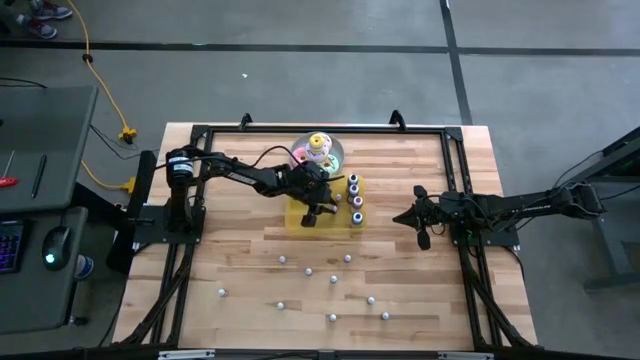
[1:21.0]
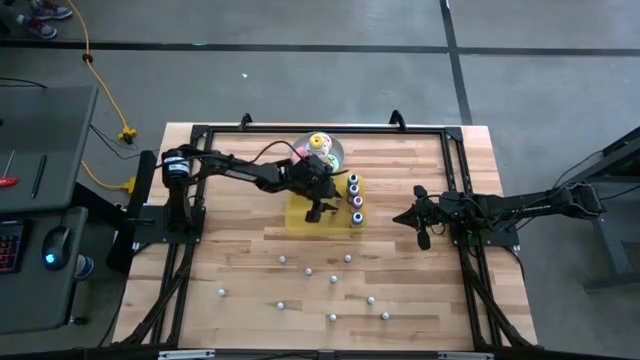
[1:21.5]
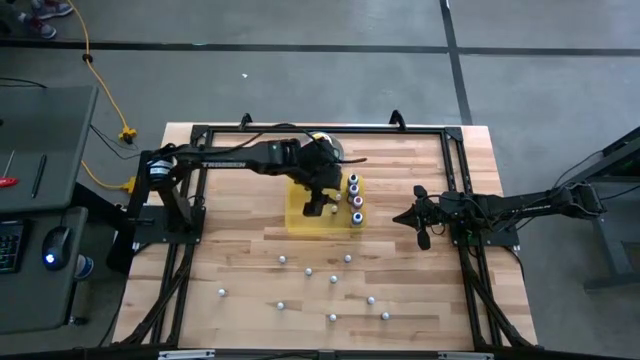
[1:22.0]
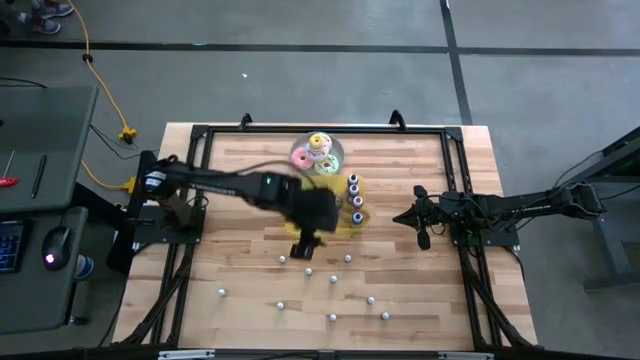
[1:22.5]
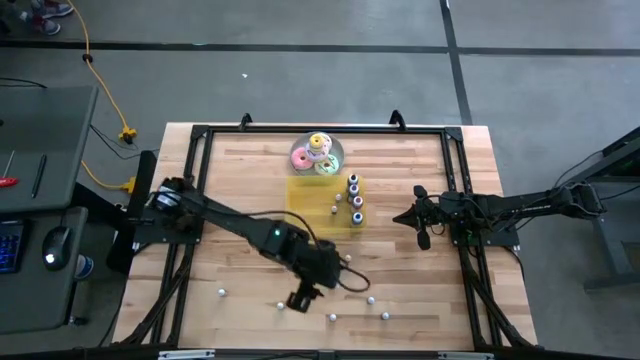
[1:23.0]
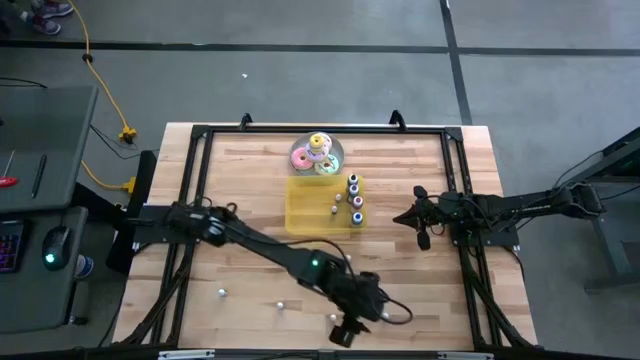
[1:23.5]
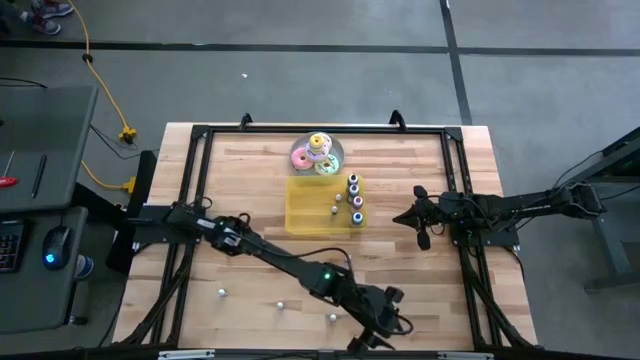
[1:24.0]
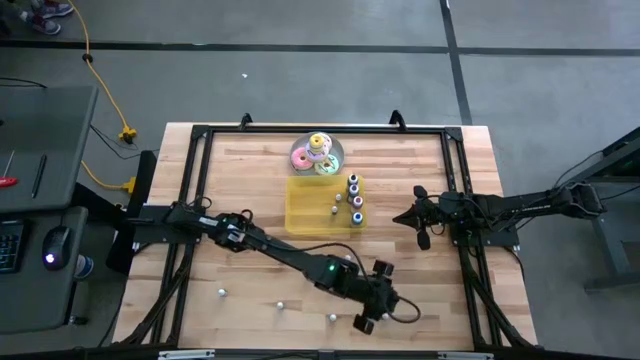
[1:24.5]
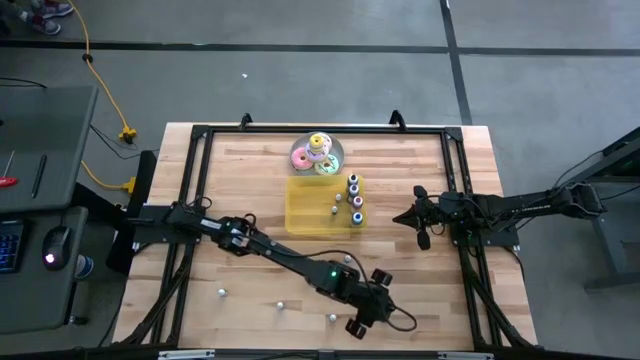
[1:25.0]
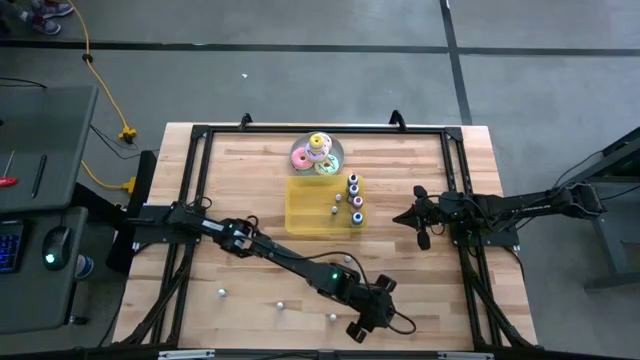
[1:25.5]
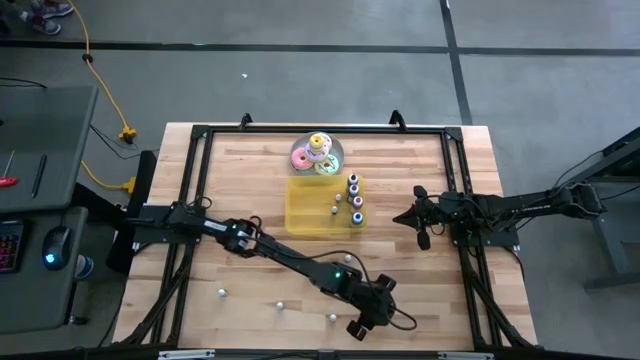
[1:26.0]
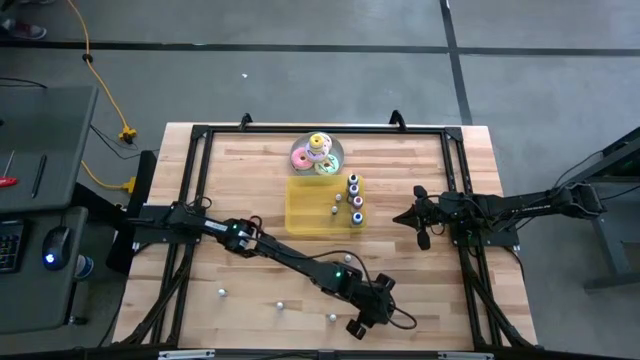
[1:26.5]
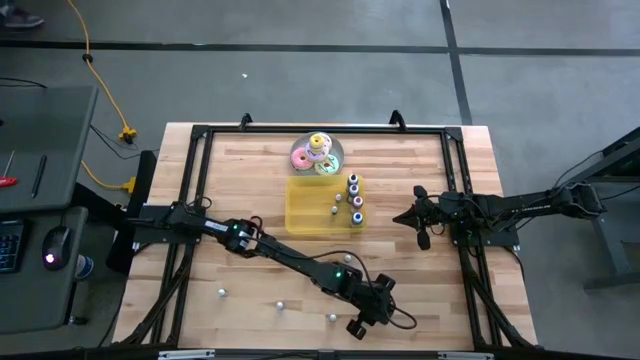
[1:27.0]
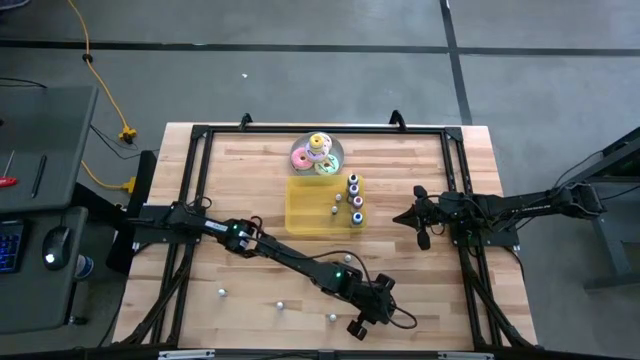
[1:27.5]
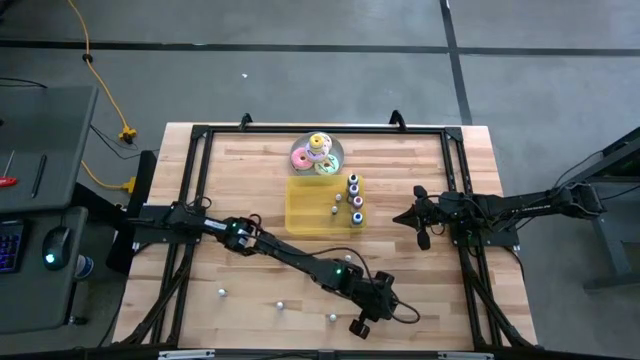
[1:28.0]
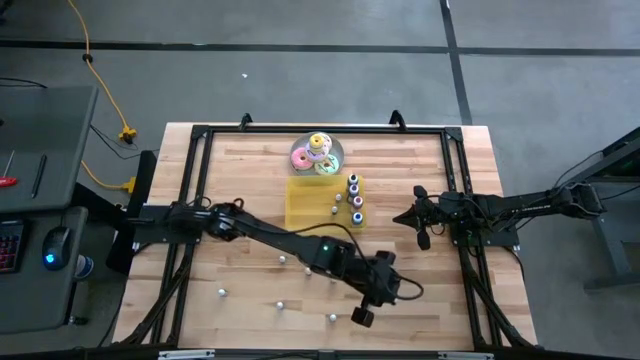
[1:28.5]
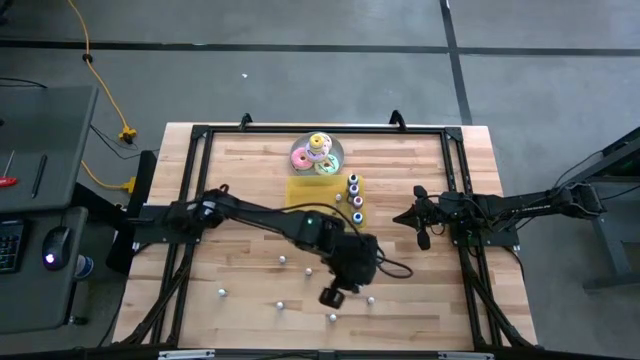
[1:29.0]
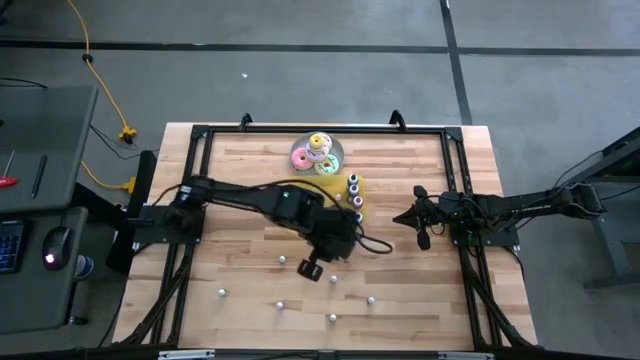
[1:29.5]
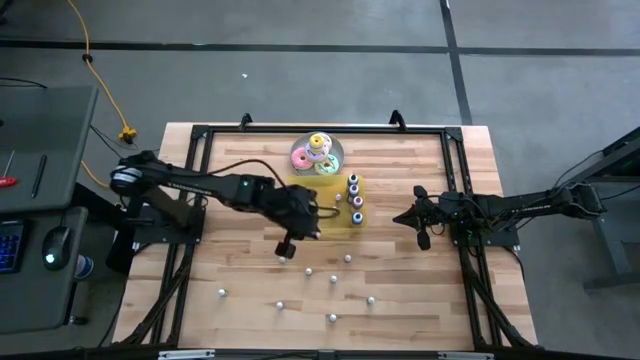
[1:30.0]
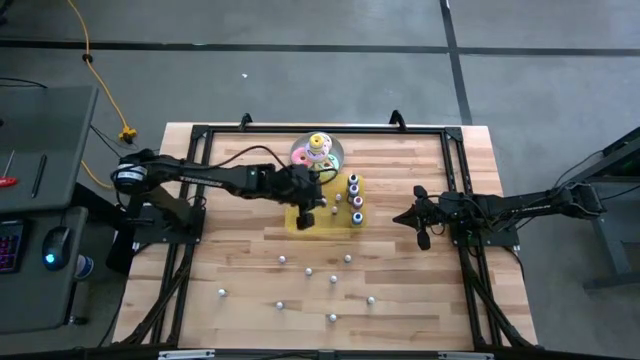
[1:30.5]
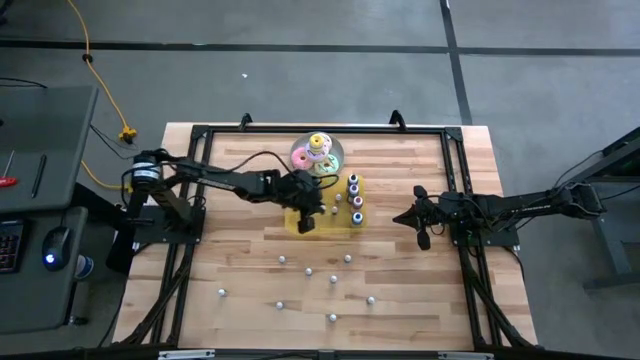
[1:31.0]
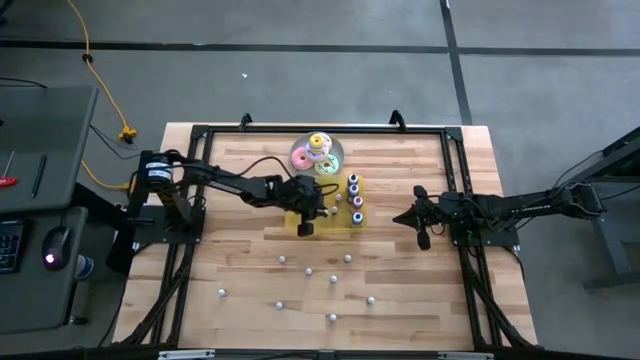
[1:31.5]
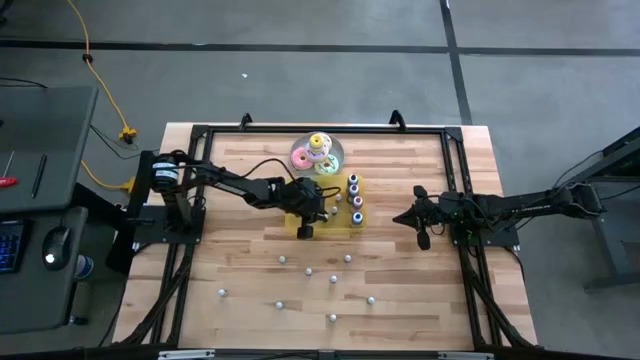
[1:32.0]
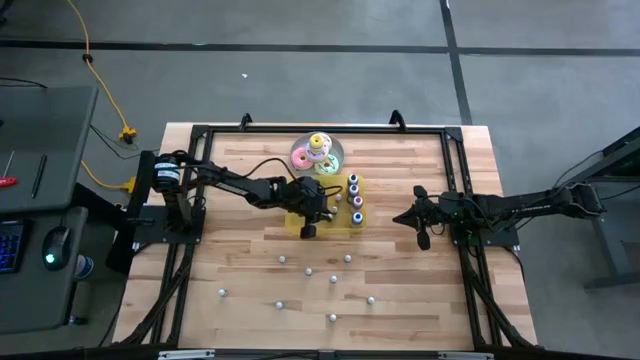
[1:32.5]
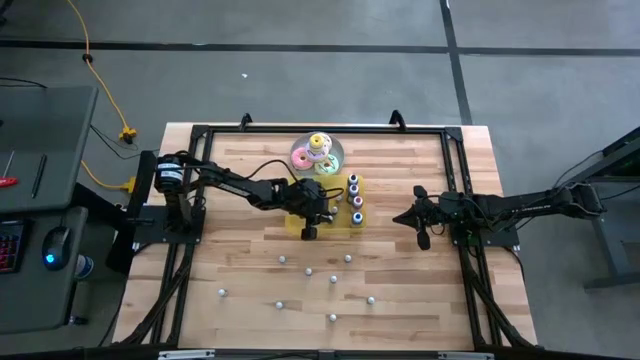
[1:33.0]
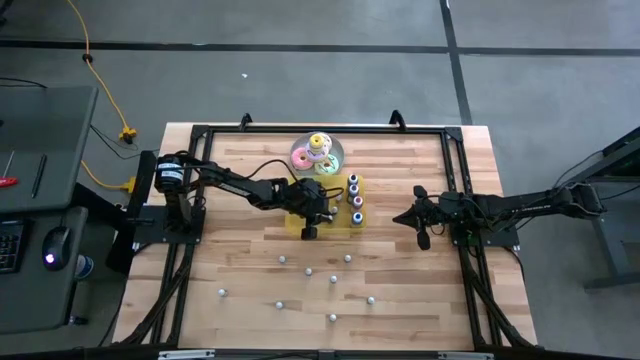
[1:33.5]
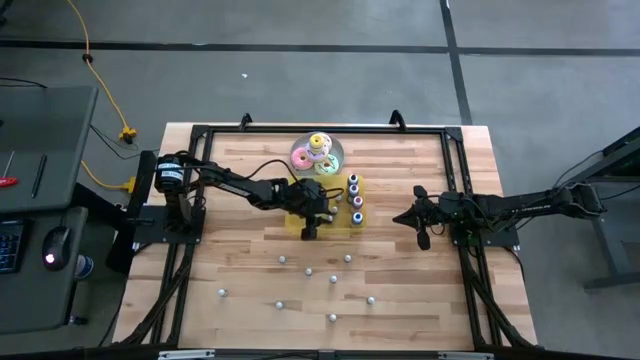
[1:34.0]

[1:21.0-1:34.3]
Task: Pick & Place food coloring
Put the small blue food coloring bottle into the yellow container

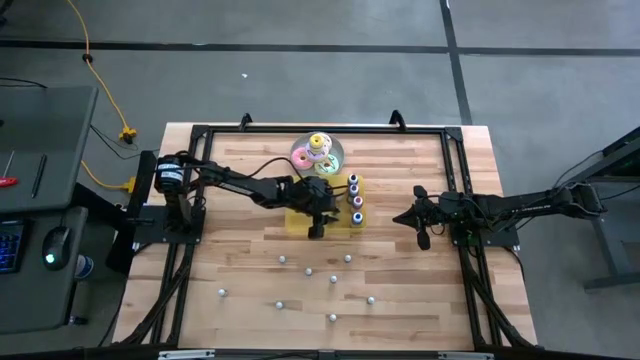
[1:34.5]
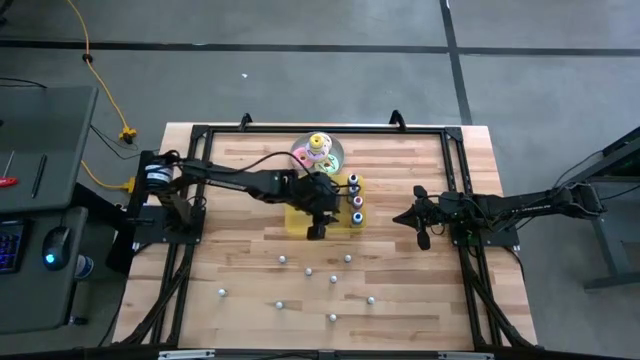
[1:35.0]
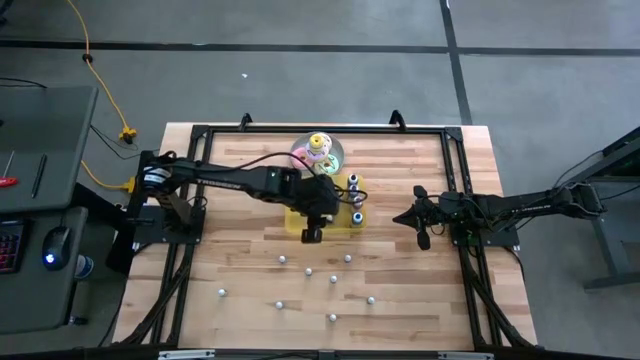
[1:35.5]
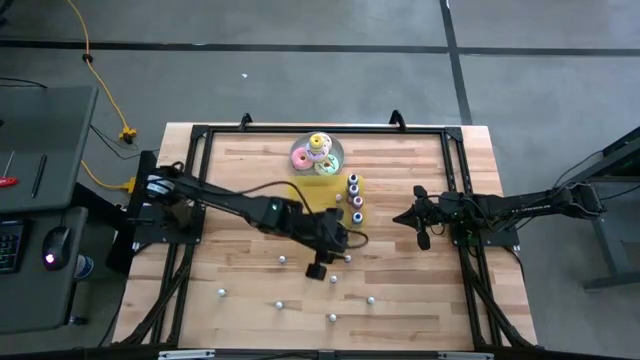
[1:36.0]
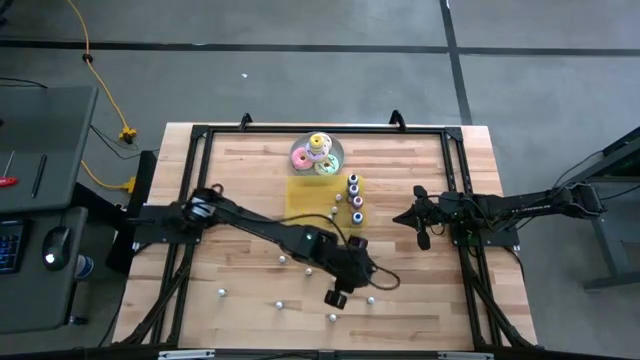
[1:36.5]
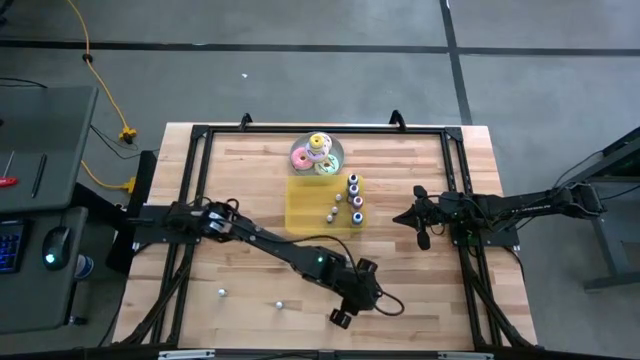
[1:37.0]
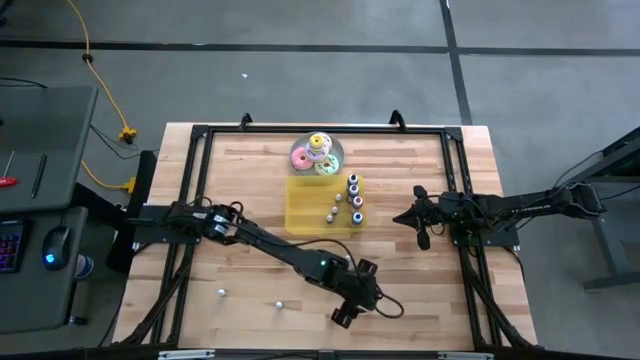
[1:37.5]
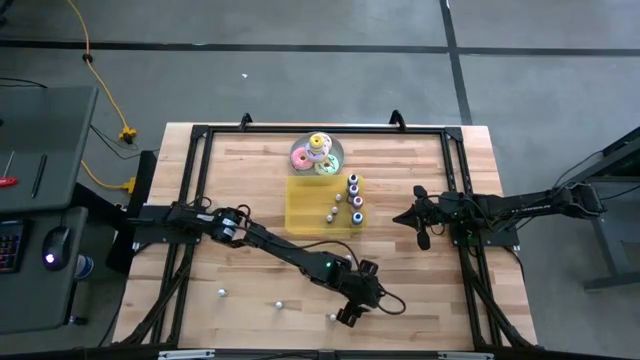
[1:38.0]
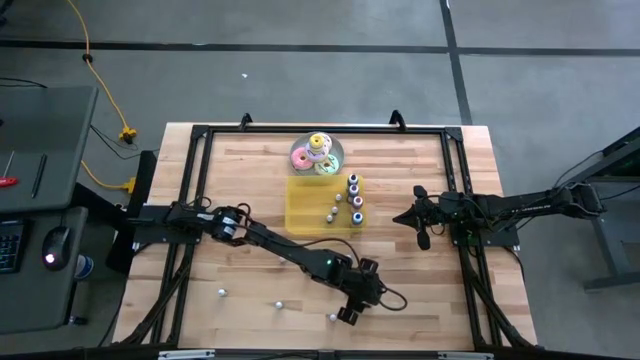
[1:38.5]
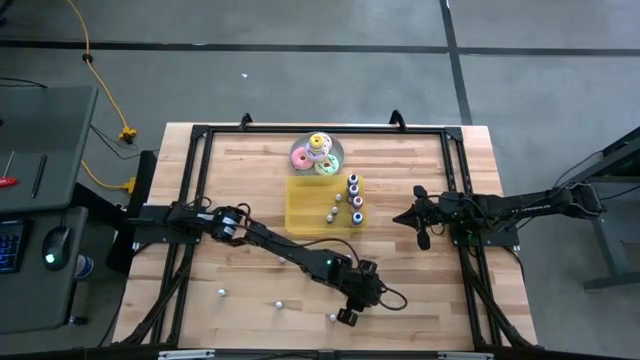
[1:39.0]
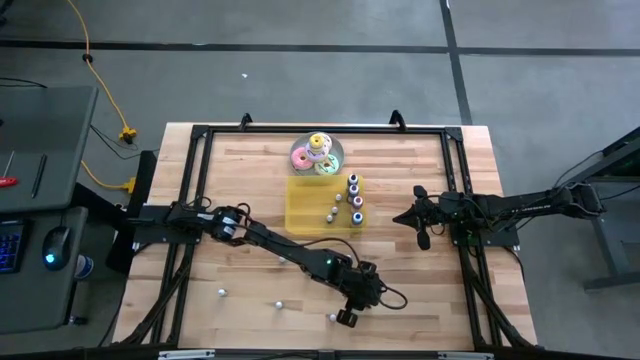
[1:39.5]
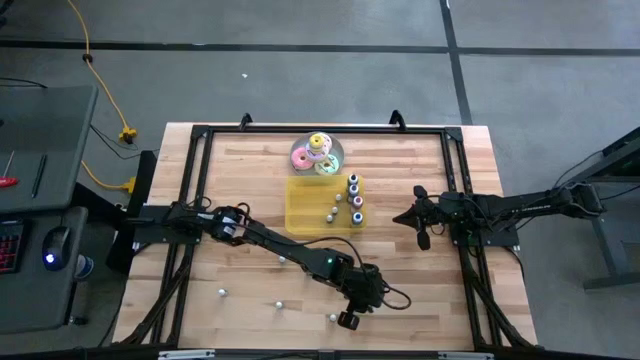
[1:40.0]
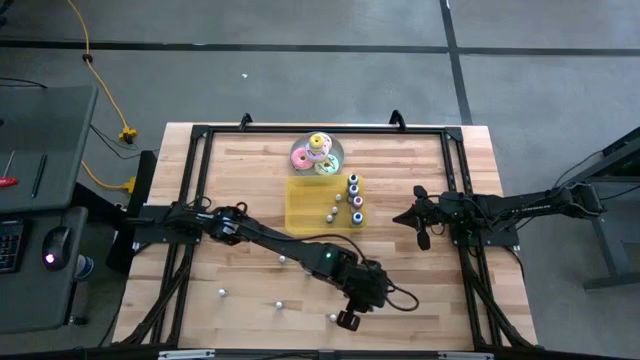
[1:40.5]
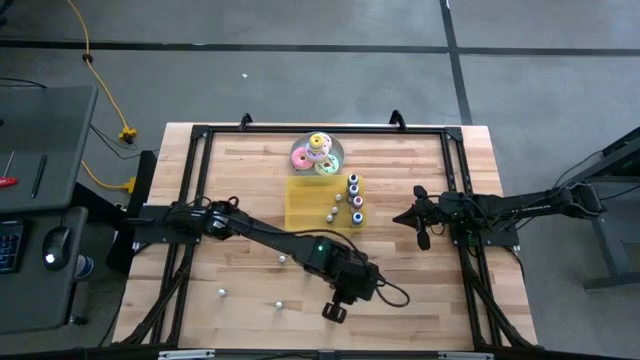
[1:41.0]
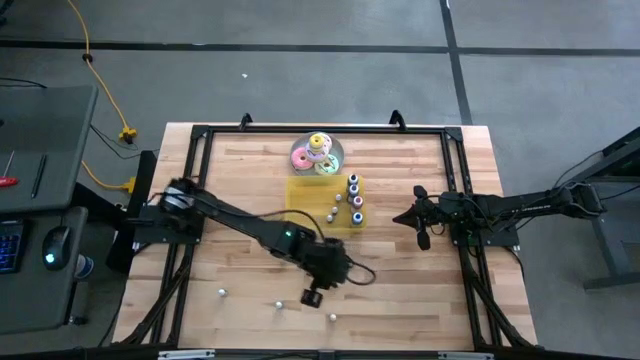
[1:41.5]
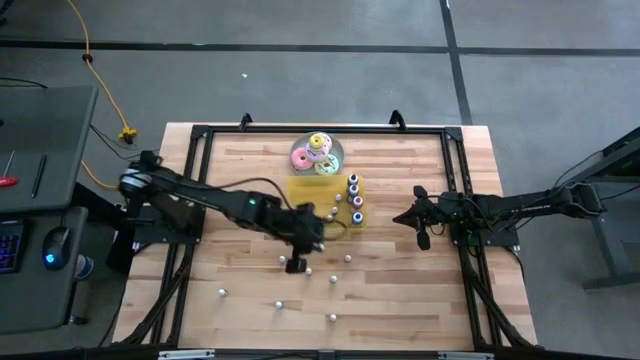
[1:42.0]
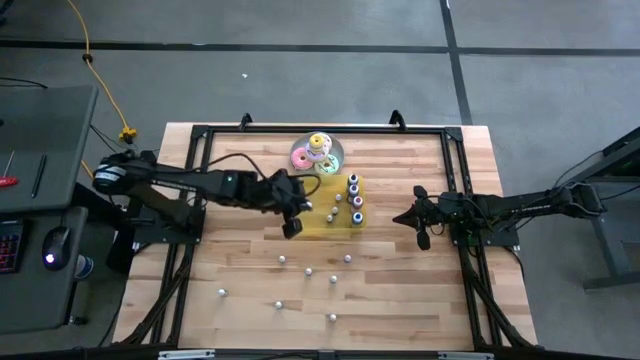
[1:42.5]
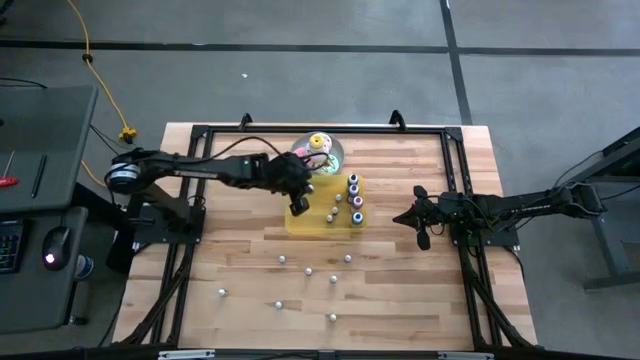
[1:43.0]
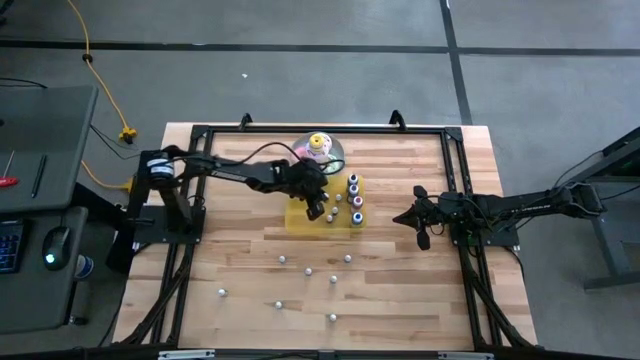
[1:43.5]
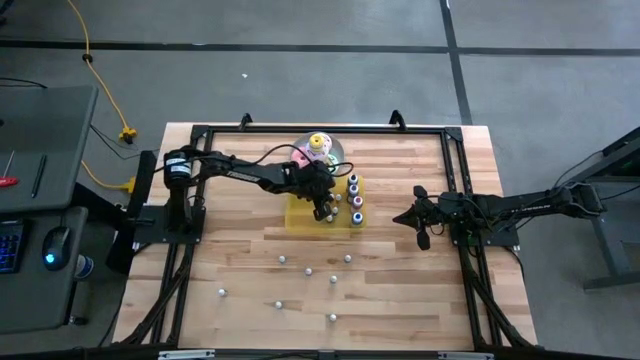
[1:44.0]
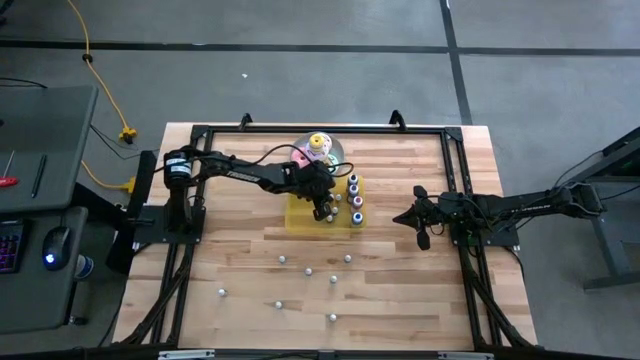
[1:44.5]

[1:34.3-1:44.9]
Put the bottom small green food coloring bottle into the yellow container
